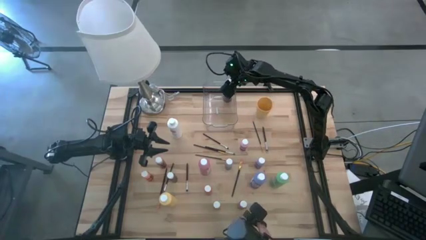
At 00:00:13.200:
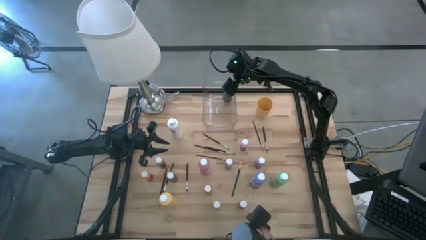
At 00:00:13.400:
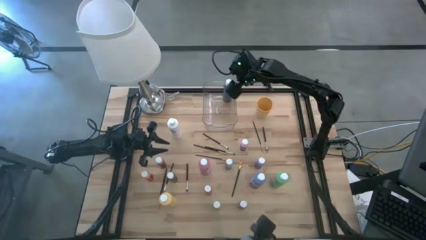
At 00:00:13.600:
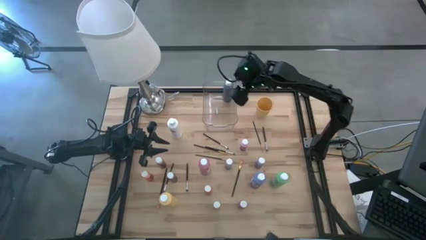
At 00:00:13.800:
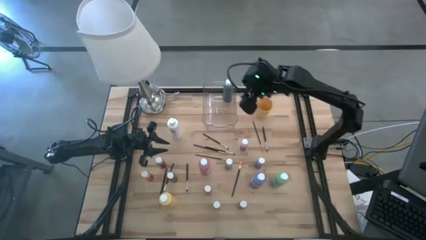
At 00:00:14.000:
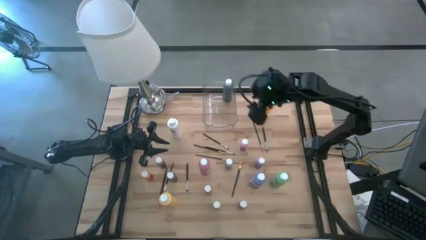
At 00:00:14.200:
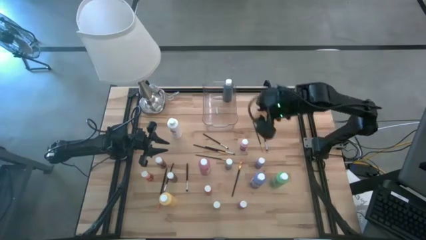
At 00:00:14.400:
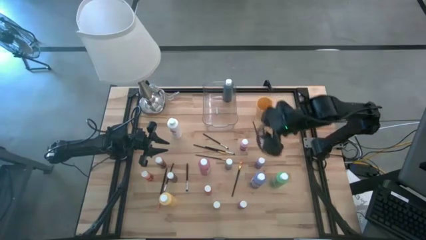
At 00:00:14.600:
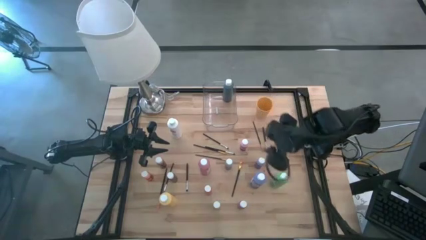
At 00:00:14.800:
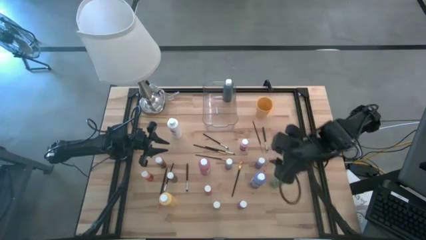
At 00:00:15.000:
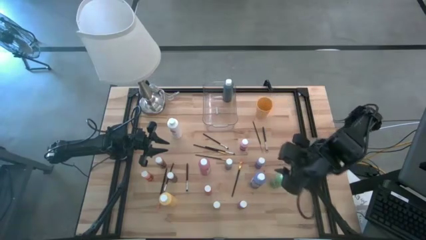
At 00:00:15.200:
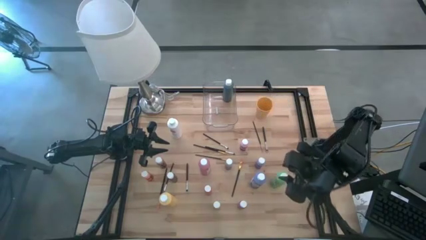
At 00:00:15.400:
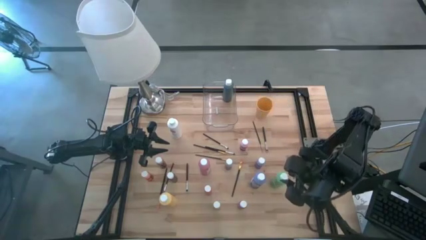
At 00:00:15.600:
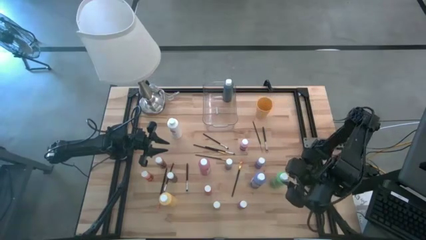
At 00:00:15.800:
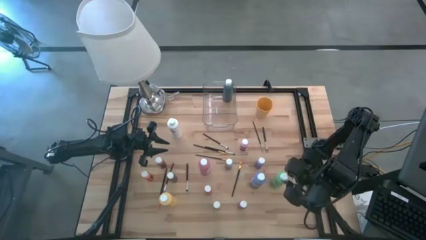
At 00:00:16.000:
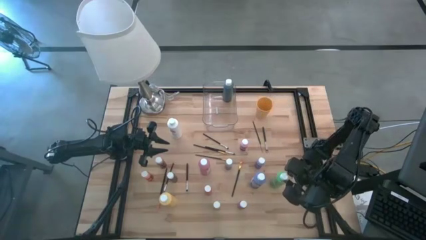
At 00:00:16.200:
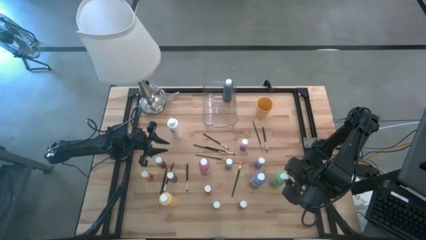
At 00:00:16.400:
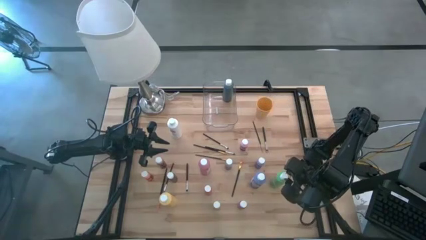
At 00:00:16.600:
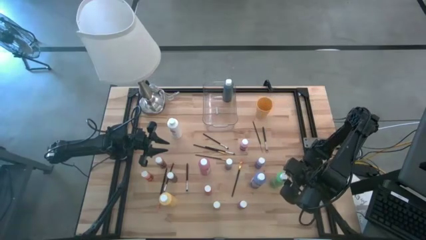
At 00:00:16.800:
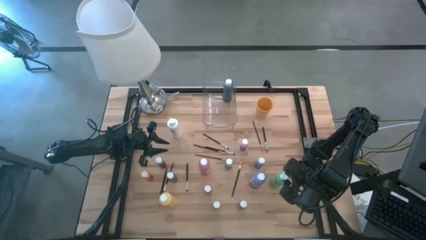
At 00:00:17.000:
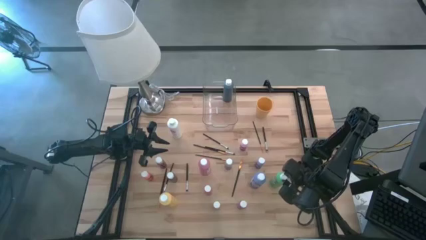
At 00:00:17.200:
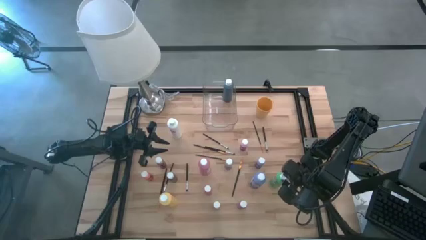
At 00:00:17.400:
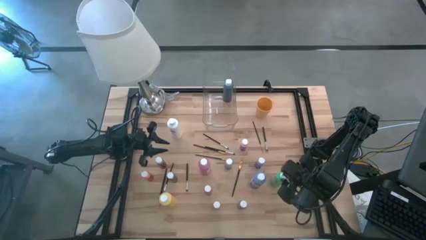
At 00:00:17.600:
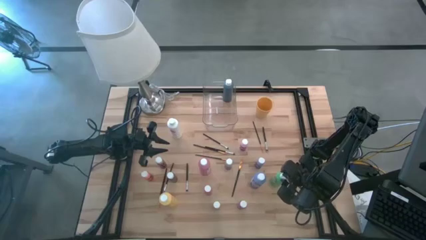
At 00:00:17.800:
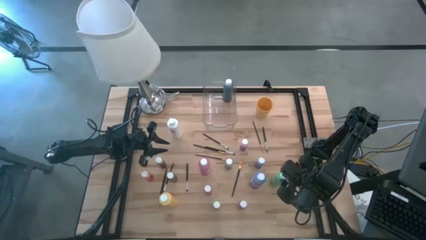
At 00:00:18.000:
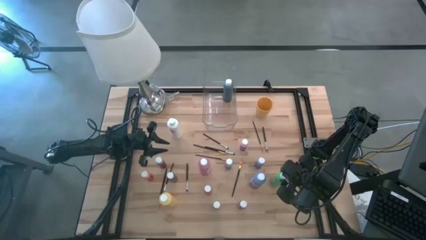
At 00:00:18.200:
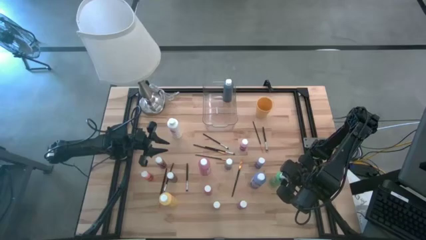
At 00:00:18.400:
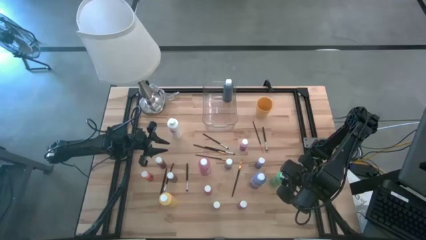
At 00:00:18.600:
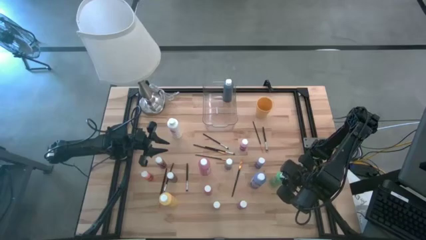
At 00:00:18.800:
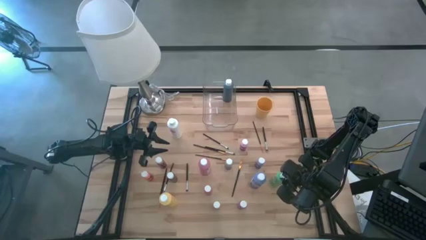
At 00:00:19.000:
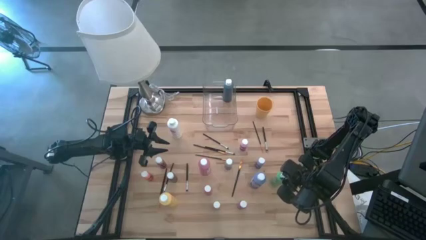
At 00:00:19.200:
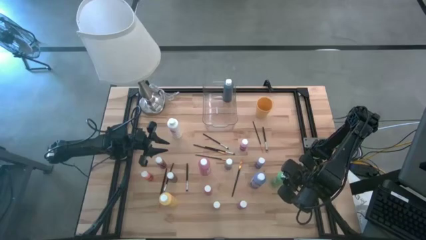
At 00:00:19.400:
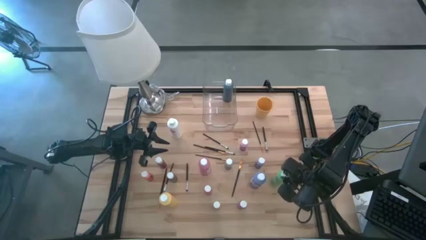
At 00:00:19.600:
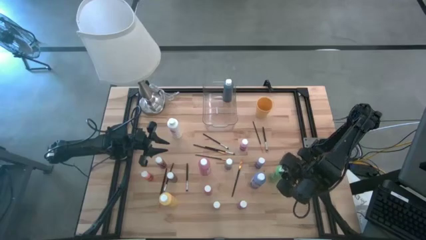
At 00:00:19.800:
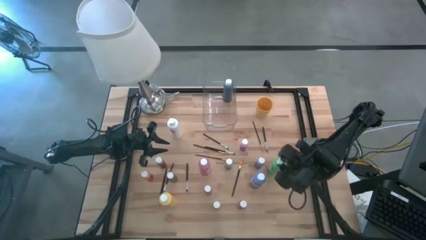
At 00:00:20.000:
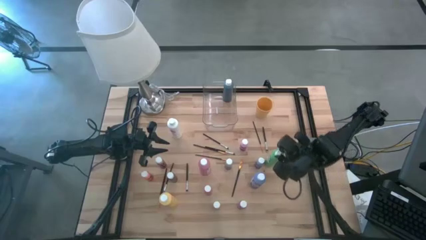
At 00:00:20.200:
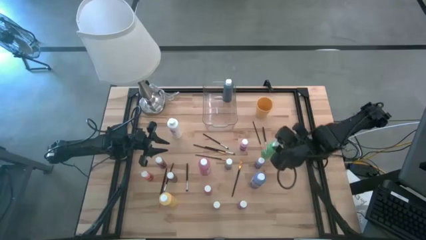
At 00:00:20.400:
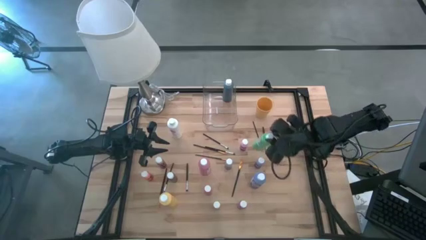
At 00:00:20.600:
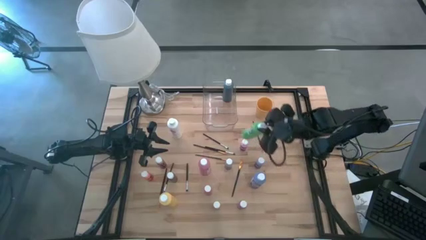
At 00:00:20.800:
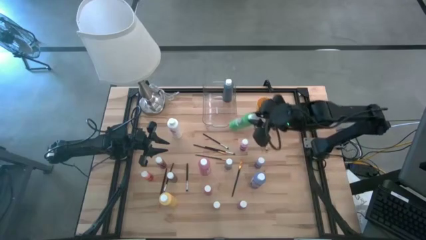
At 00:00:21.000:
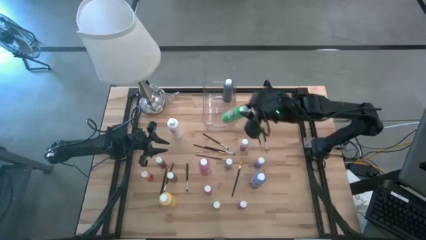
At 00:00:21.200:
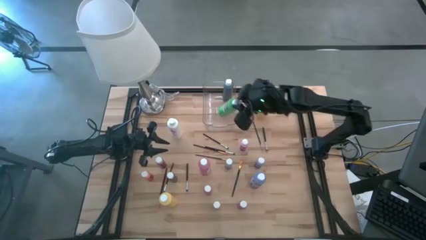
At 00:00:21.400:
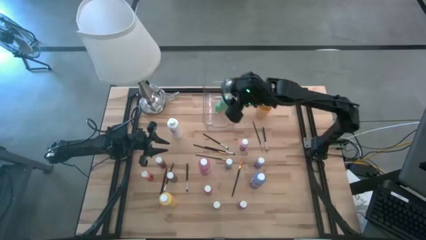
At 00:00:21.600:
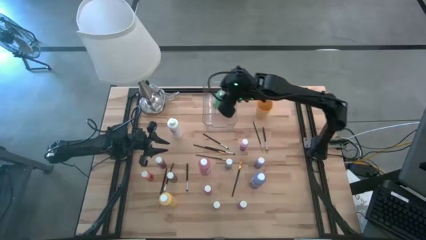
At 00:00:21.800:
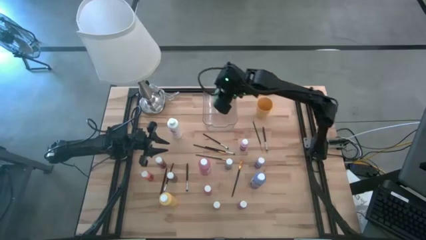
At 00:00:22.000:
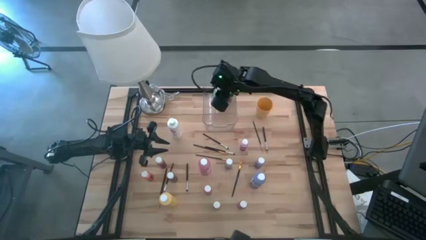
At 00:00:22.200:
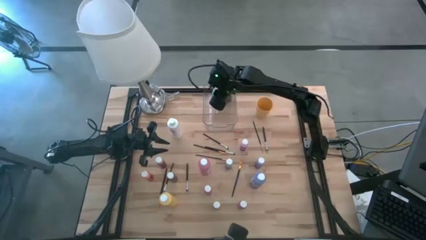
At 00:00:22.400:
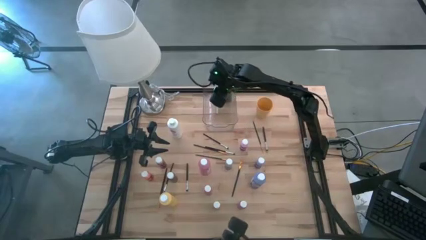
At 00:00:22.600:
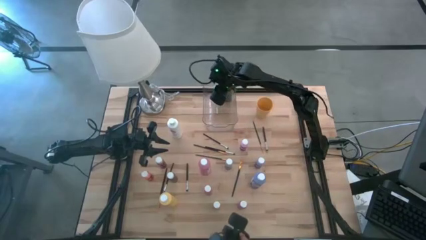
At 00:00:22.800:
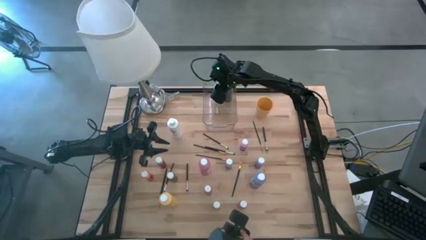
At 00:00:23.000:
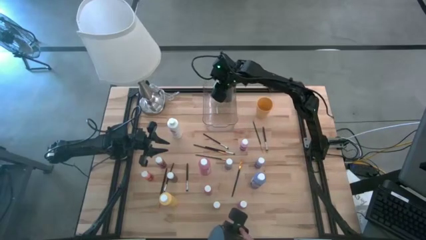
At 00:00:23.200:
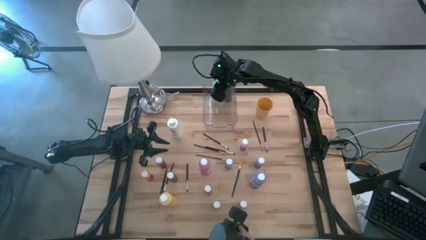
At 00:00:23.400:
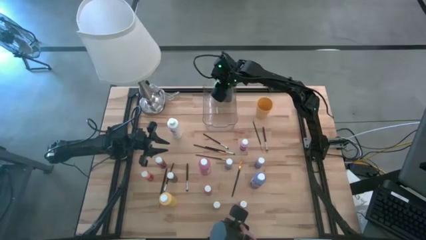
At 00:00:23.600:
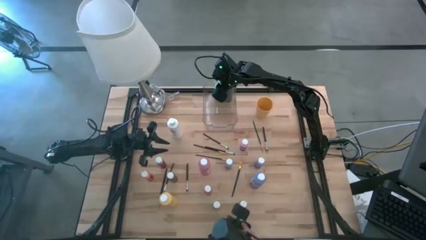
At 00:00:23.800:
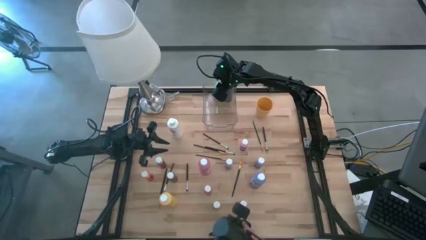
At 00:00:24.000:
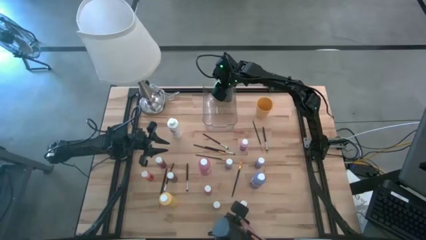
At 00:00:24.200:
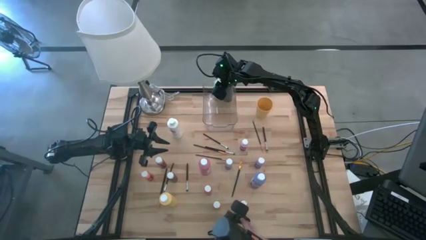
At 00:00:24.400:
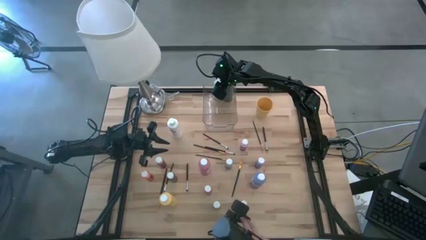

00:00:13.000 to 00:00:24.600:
Task: Pick & Place Paint Supplies
Put the big green paint bottle into the bin
